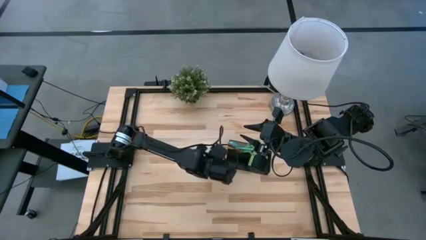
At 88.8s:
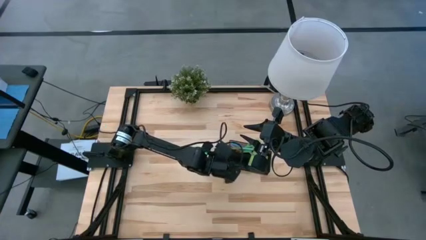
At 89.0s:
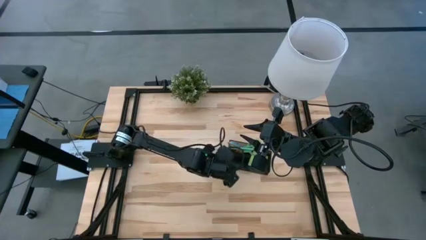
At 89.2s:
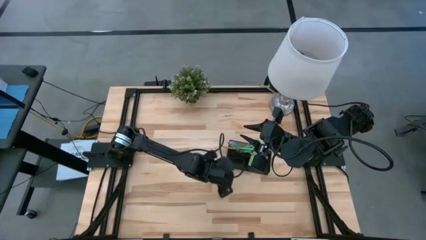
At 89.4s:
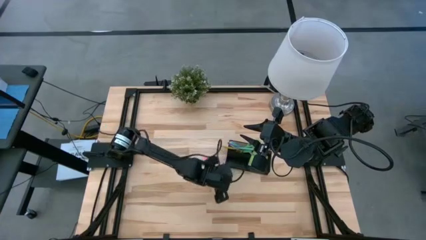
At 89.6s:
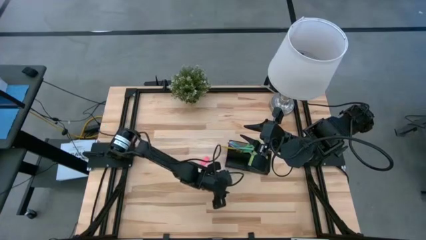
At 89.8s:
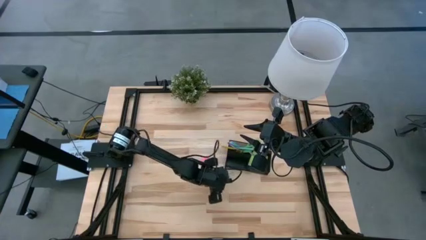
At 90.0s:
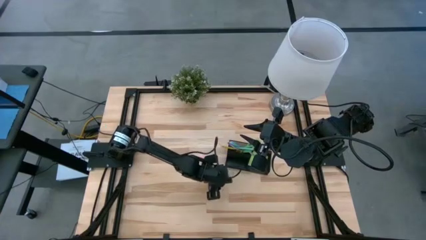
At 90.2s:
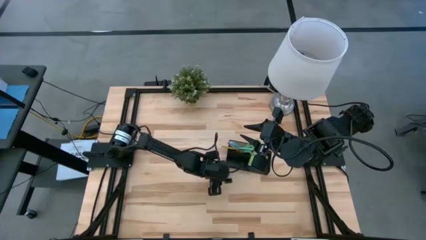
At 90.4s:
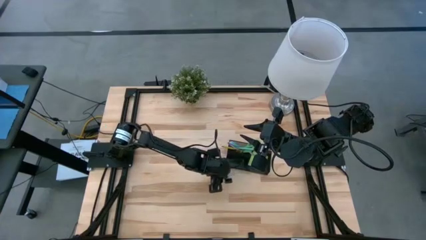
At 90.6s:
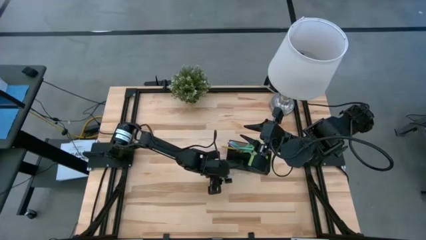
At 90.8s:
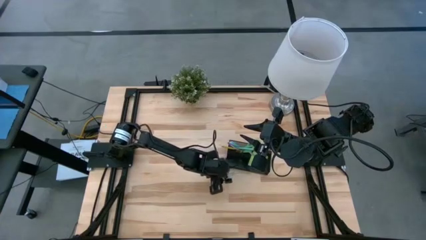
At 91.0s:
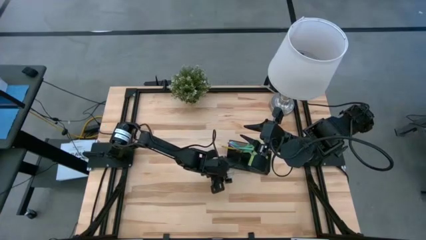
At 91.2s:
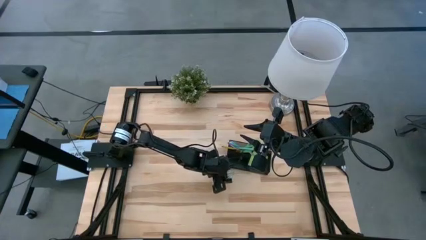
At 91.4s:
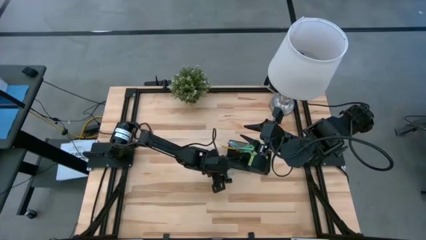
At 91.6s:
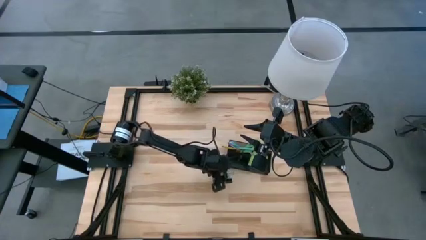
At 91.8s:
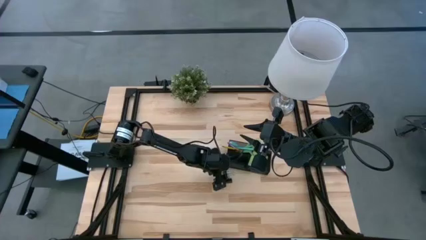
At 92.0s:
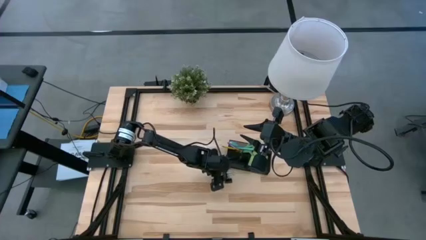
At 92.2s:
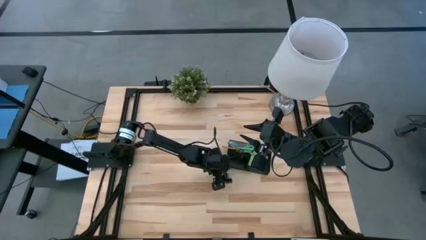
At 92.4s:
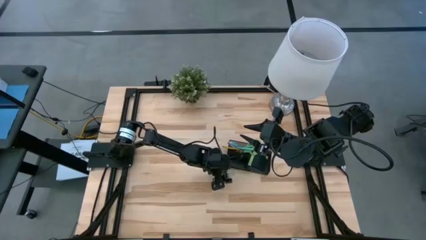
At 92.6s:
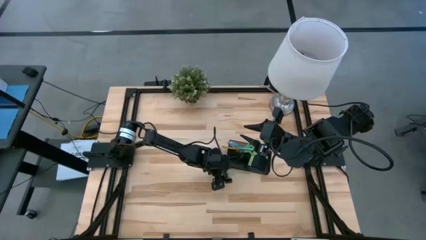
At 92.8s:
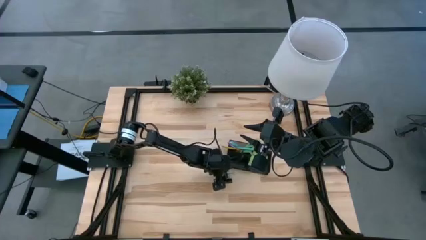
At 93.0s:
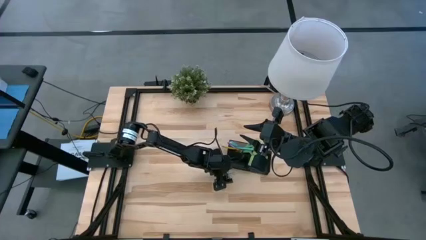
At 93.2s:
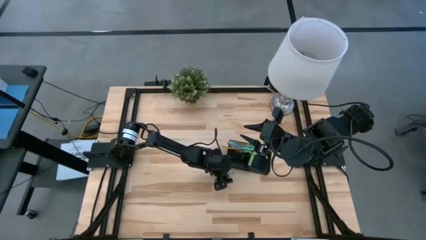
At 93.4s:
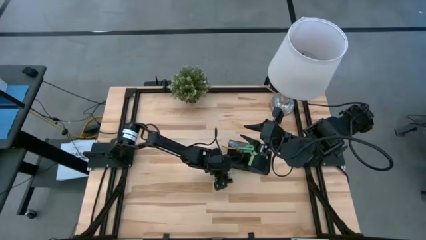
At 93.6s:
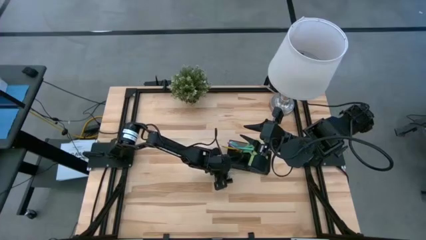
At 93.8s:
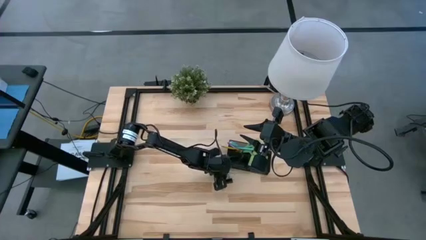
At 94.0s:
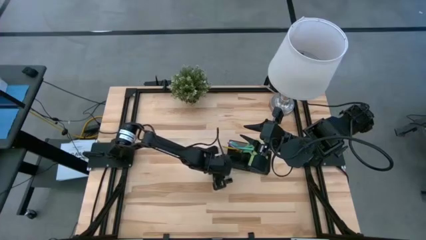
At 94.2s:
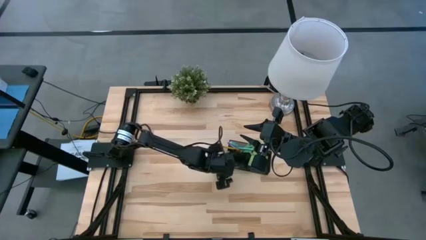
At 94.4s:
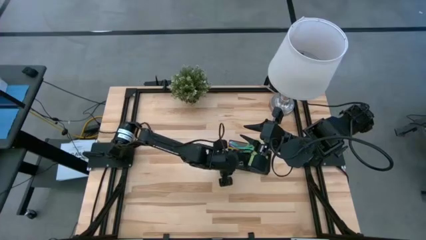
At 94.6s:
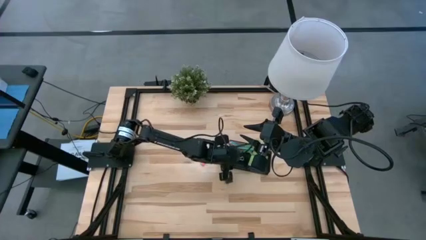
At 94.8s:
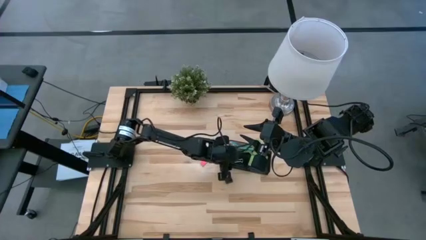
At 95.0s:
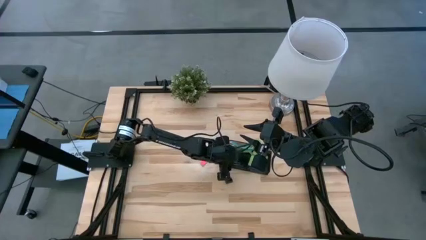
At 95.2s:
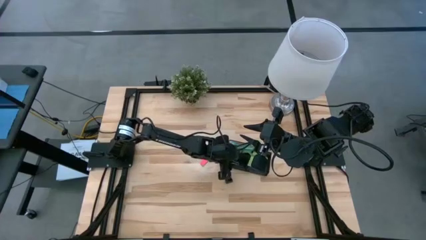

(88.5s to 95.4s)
Task: Pick and place office supplies into organizer
Put the top black binder clip on the black desk organizer

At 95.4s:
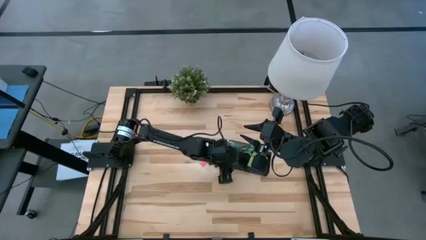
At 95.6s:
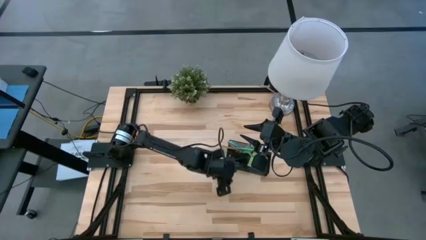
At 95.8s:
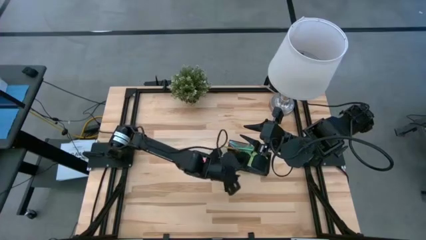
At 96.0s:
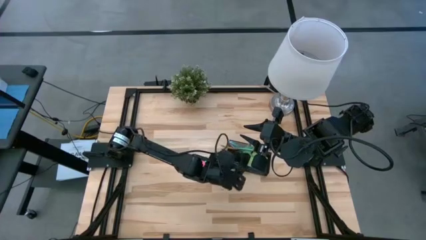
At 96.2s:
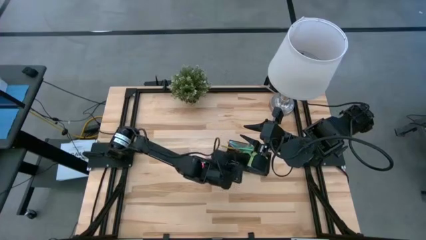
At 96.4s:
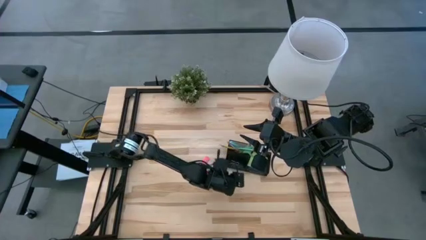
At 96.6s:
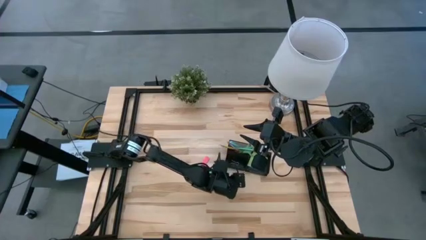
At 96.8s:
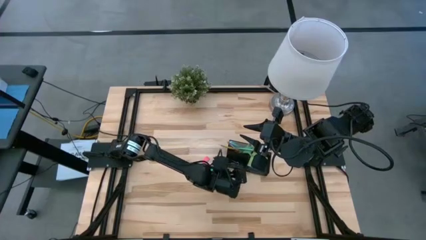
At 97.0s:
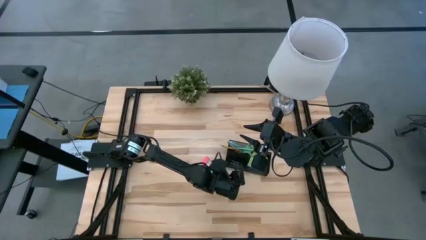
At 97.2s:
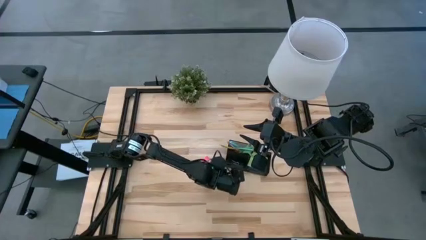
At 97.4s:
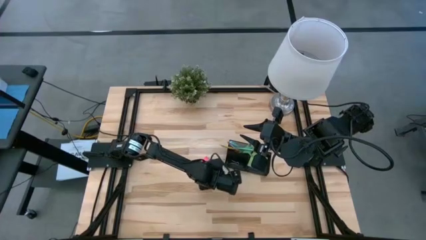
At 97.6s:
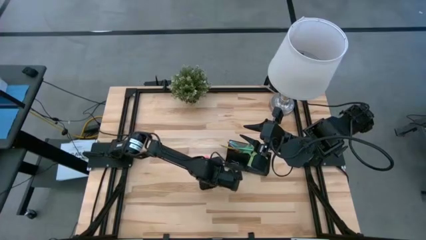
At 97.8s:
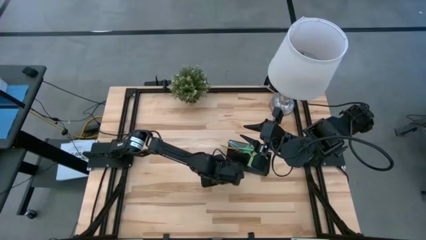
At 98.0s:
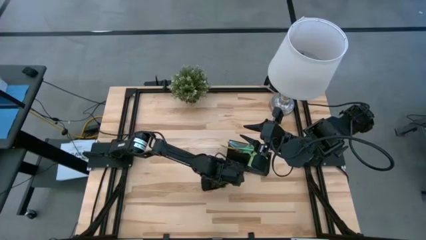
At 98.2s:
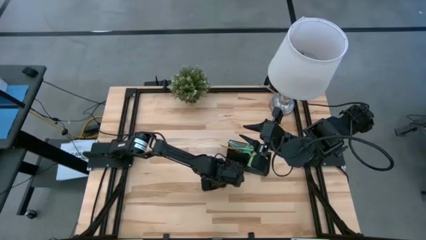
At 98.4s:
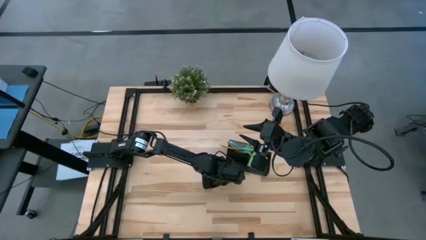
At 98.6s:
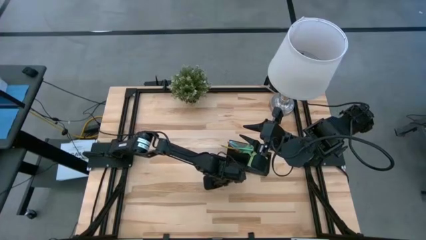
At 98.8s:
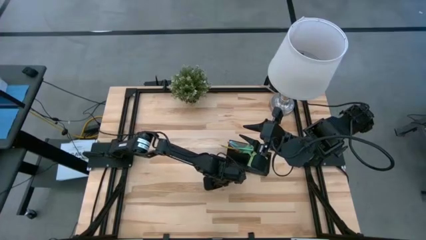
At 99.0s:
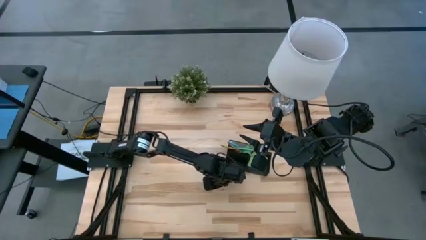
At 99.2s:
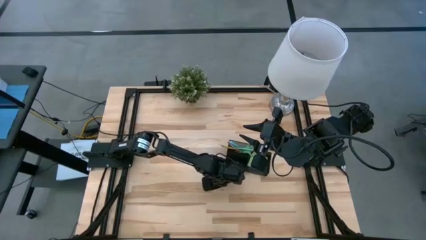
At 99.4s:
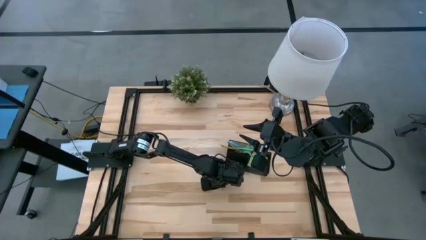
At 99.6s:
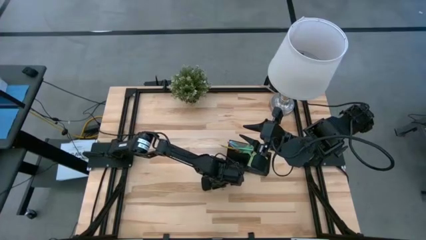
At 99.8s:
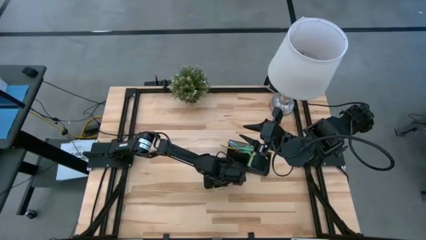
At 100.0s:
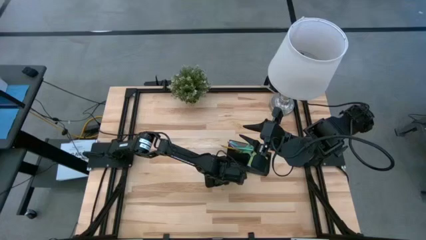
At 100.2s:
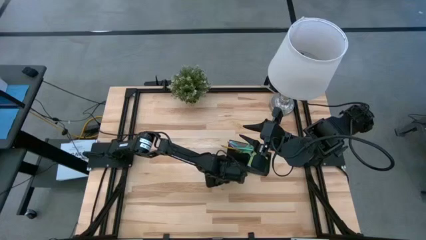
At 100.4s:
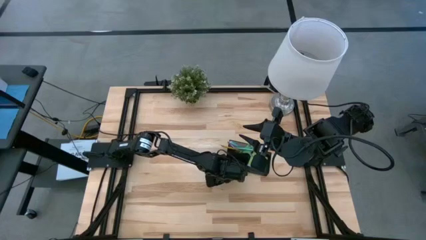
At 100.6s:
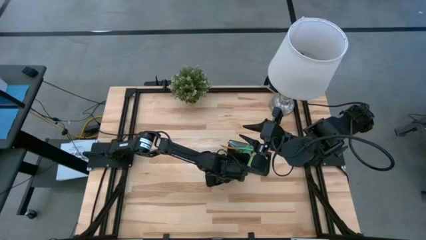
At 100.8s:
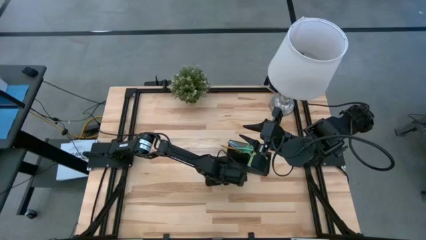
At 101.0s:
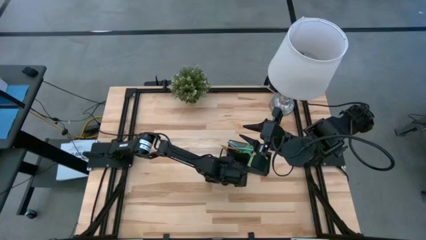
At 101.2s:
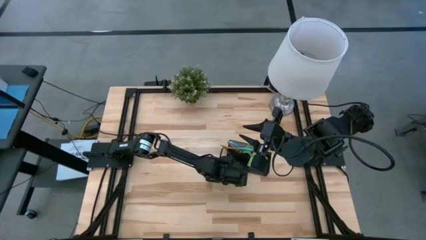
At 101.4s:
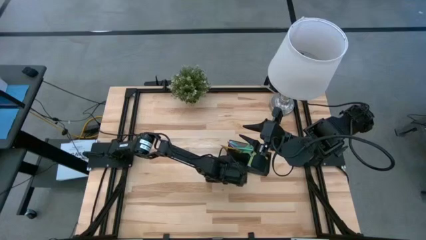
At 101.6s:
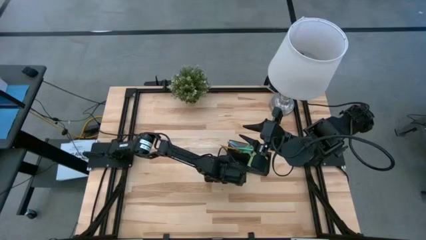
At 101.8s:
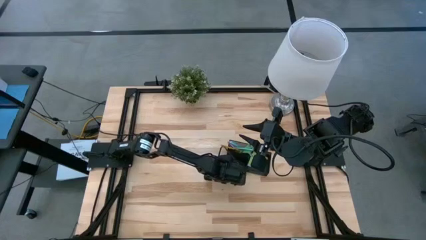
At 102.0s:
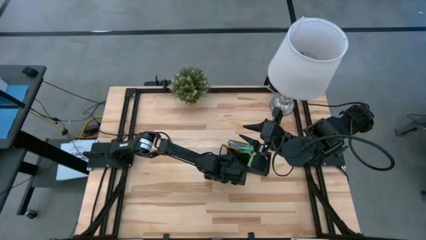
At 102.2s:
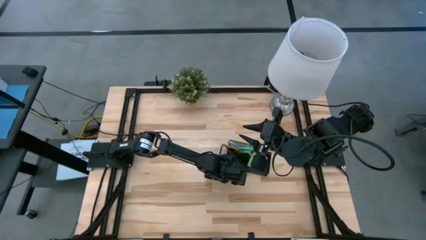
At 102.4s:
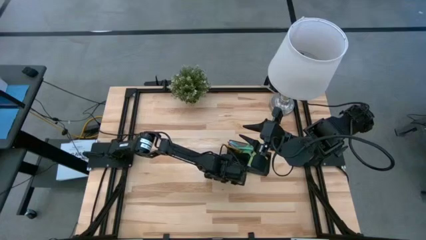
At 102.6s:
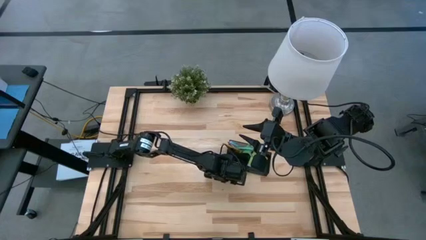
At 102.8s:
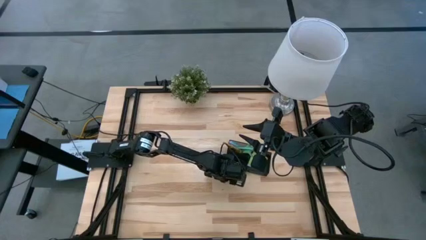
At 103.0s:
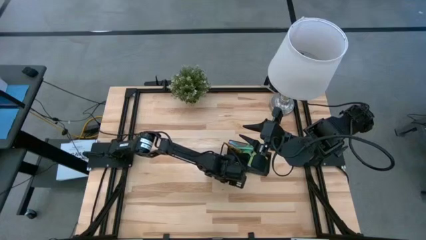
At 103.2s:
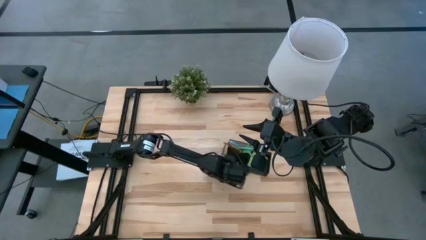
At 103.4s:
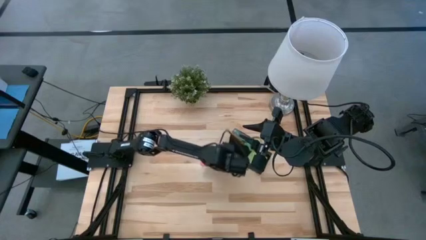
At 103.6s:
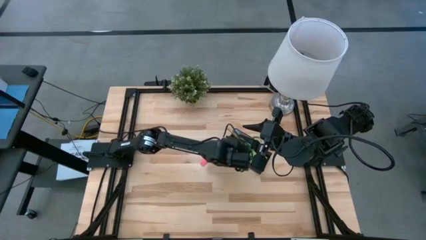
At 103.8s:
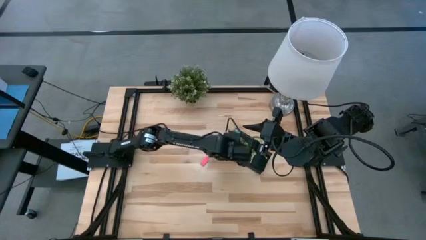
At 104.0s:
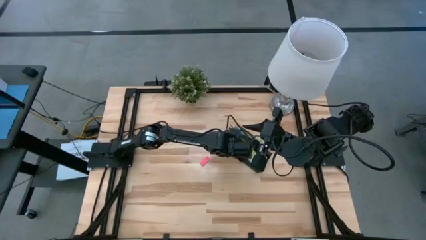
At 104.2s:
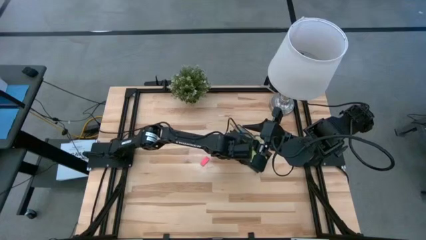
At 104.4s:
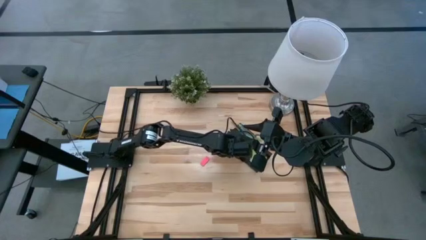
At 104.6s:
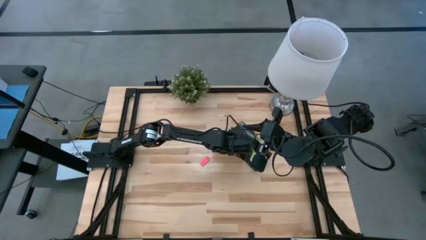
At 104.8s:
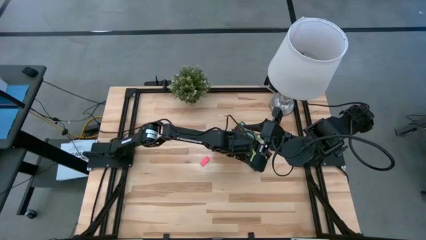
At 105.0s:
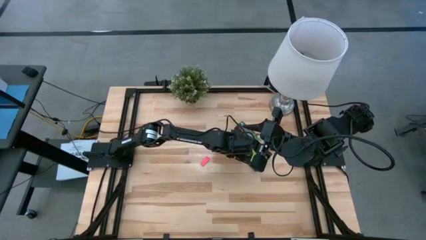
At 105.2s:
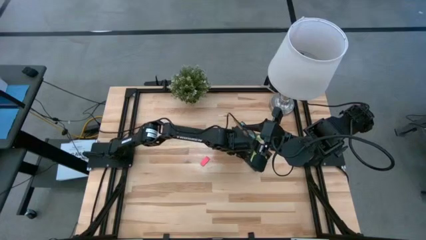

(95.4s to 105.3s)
Put the black binder clip on the black desk organizer
